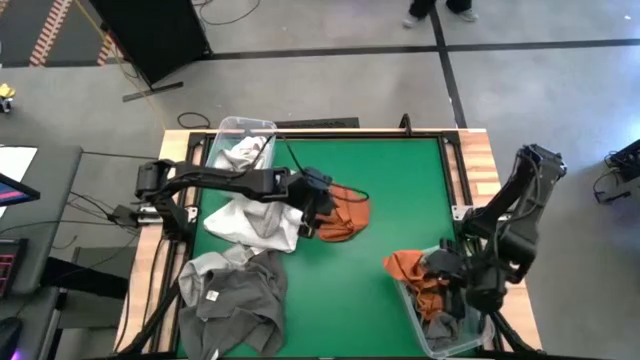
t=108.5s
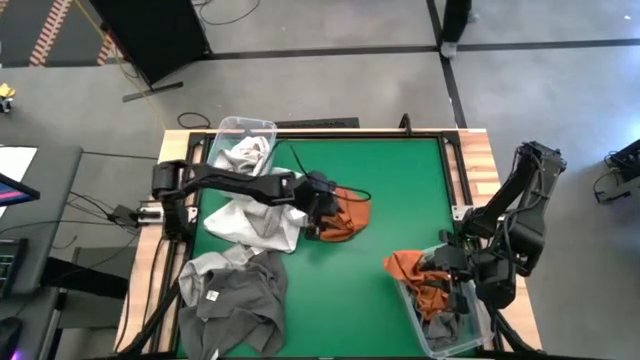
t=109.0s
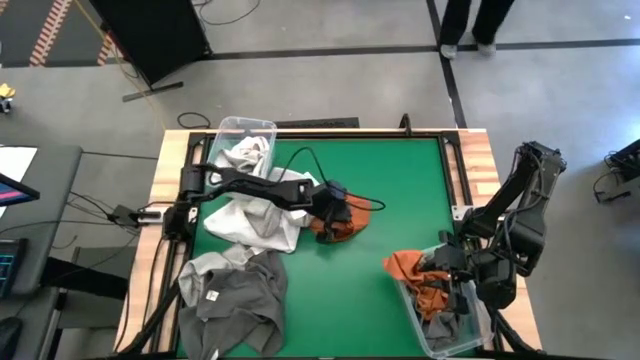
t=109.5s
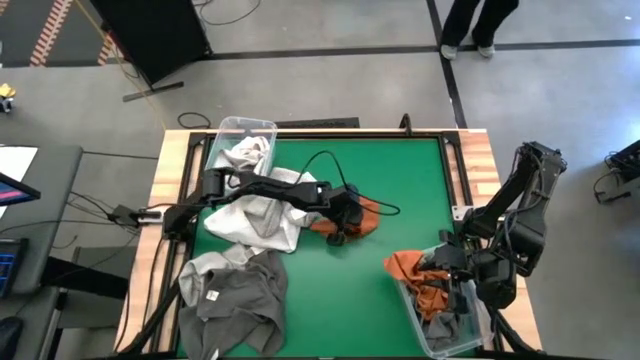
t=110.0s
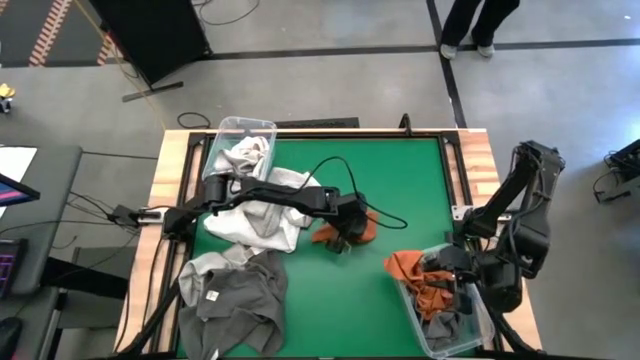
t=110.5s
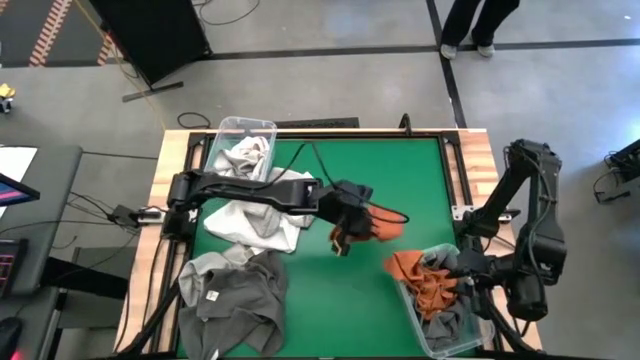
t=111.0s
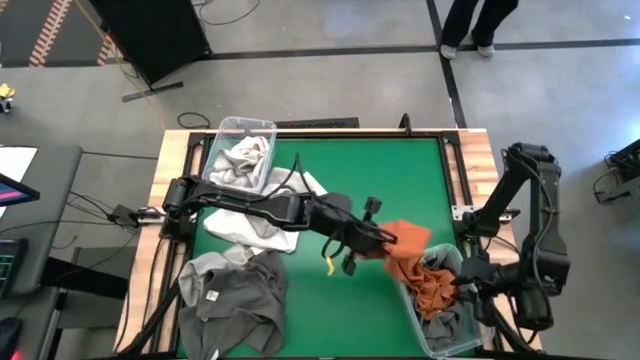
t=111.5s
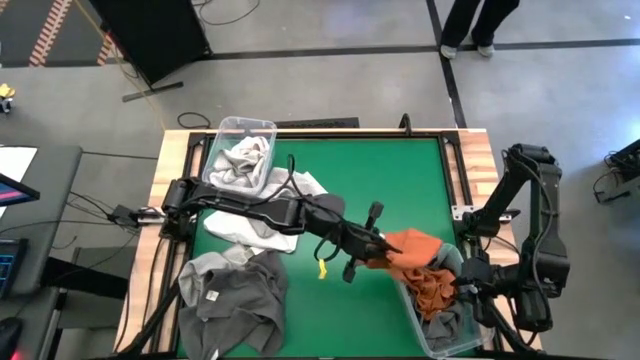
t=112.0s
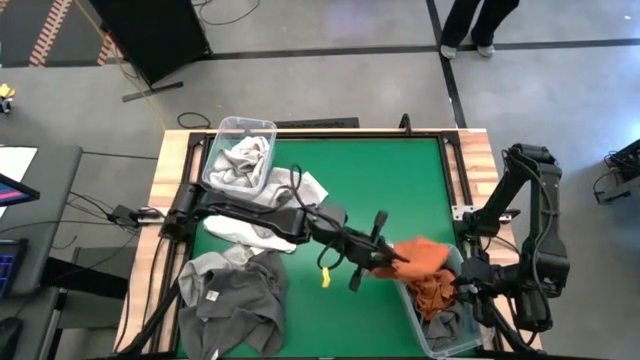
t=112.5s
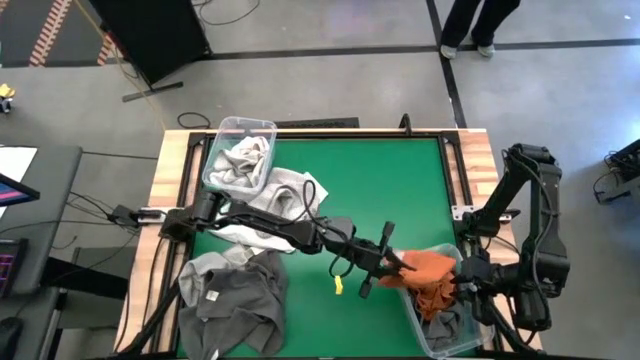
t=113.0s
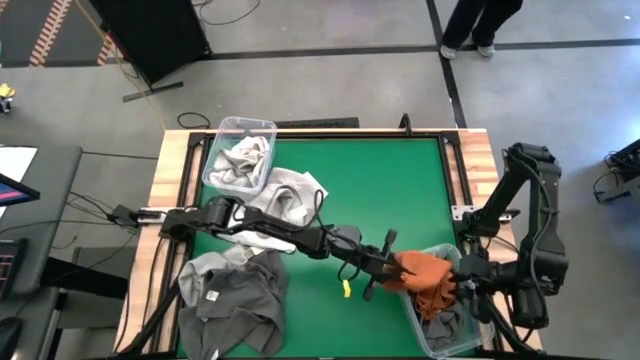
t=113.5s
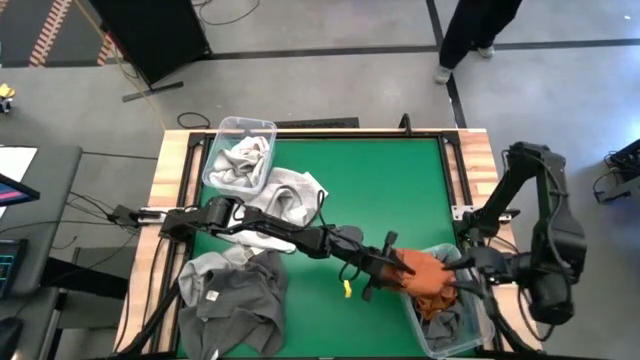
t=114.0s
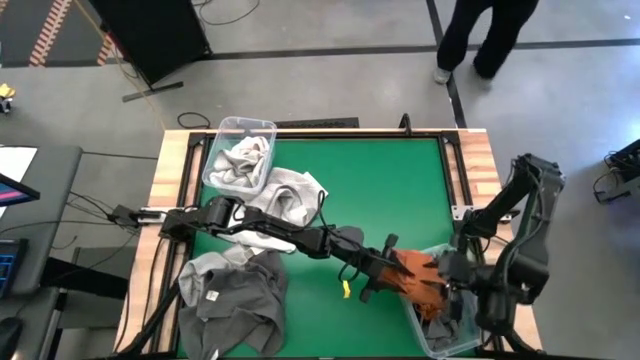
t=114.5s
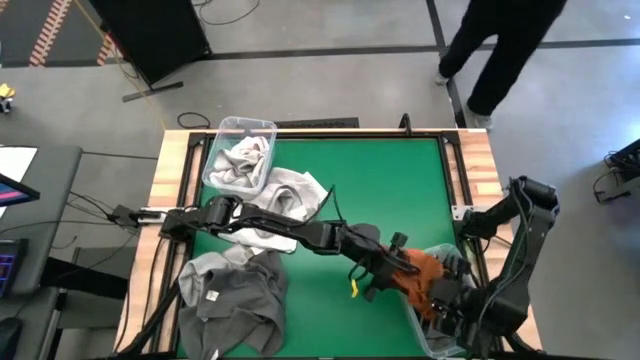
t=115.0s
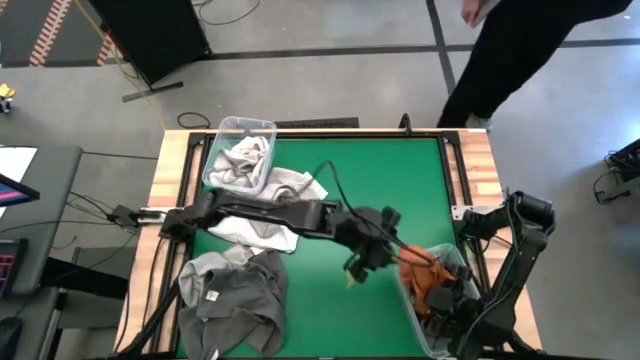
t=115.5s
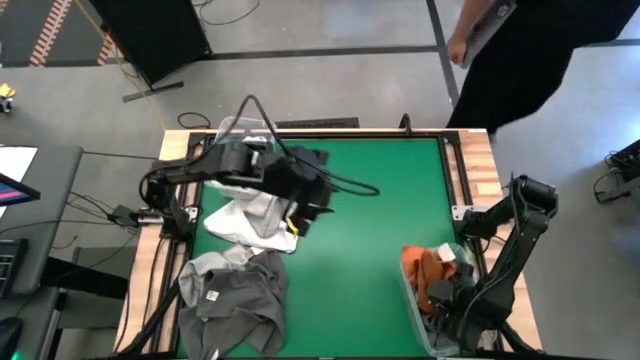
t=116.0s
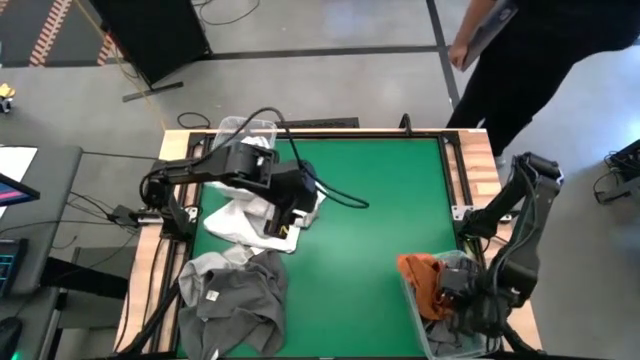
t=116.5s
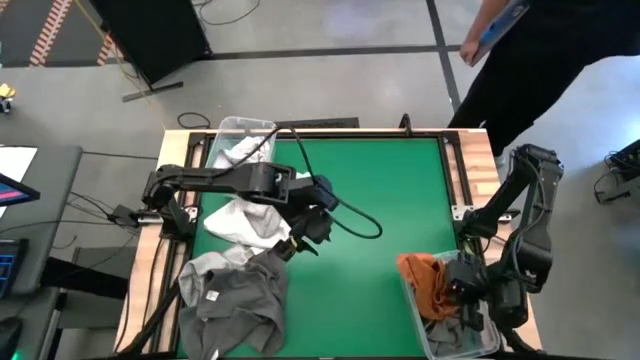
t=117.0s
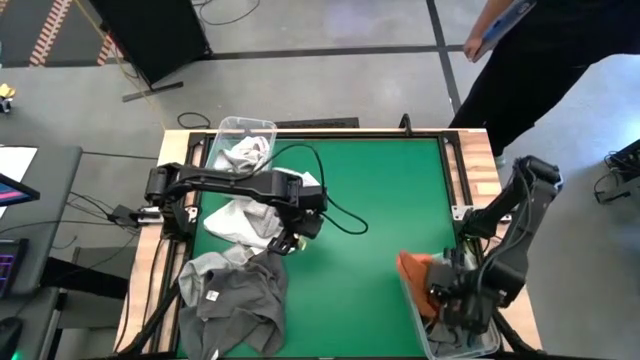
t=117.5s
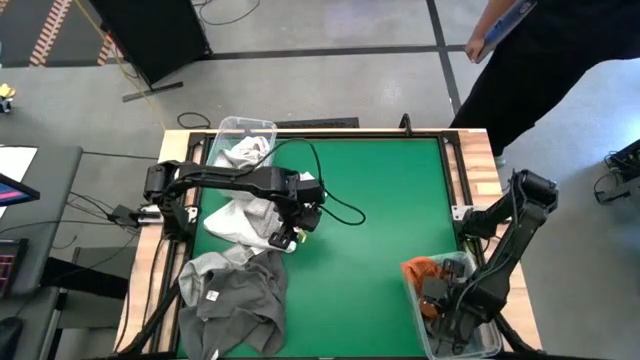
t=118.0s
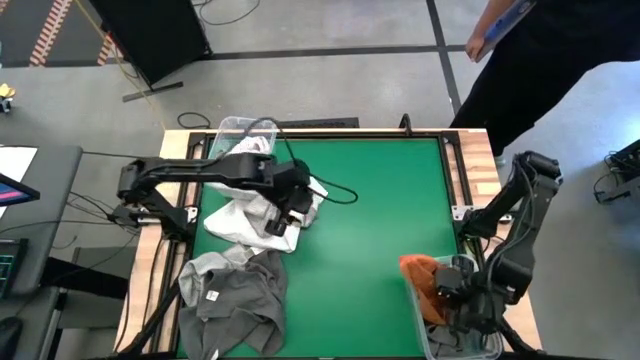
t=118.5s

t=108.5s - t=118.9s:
Task: Sort towels by color in basket
Put the orange towel into the bottom transparent bin

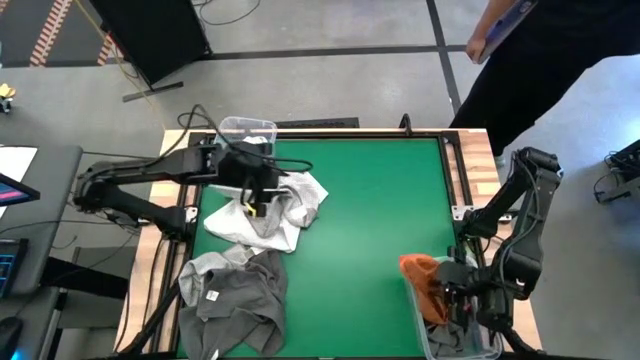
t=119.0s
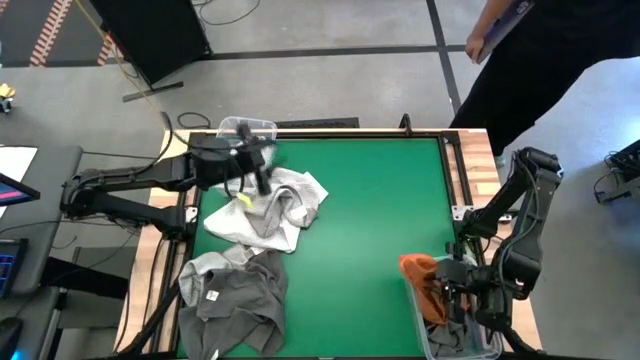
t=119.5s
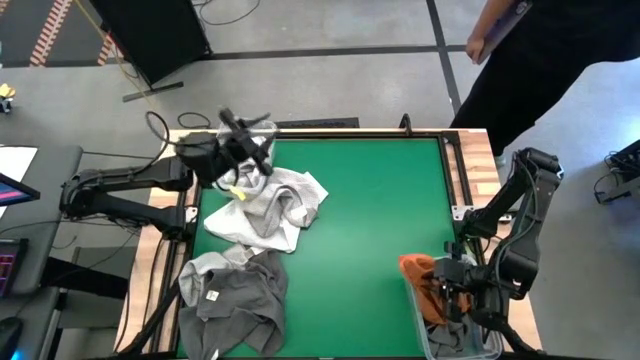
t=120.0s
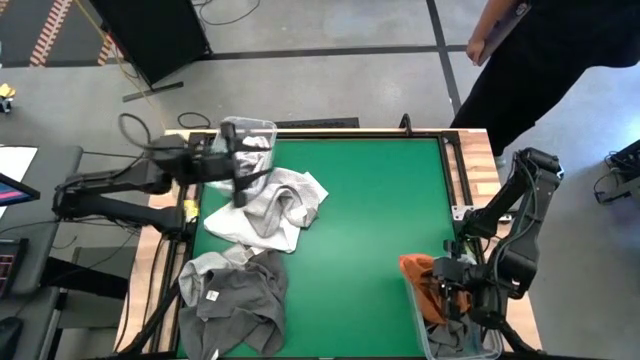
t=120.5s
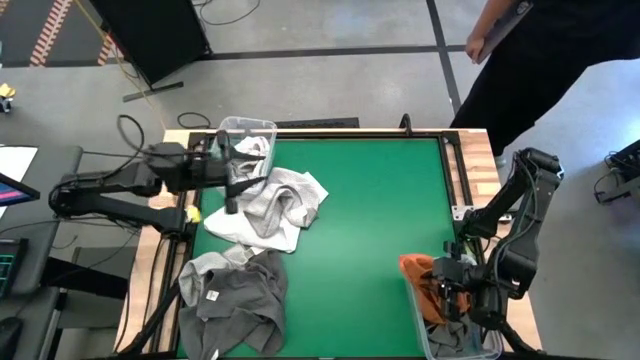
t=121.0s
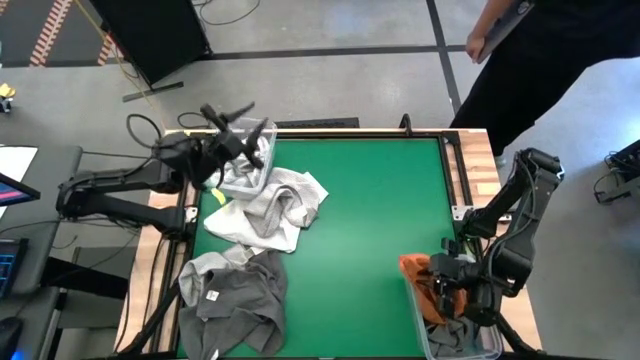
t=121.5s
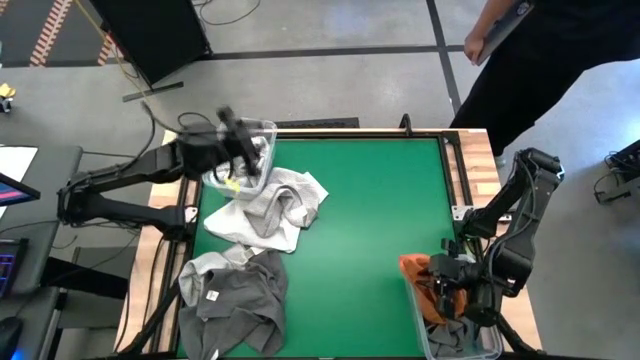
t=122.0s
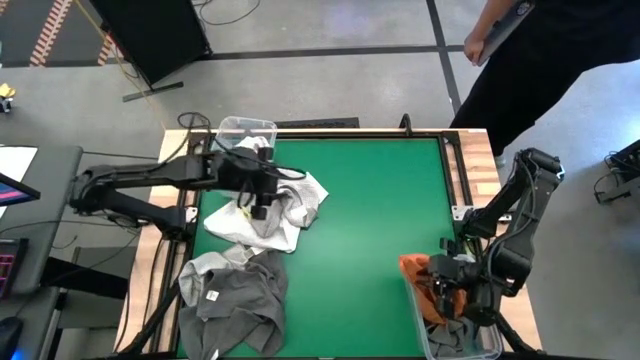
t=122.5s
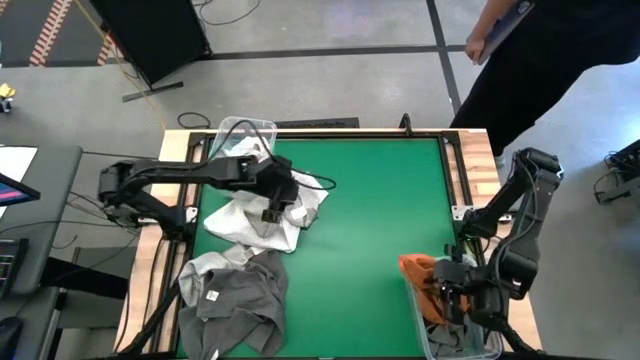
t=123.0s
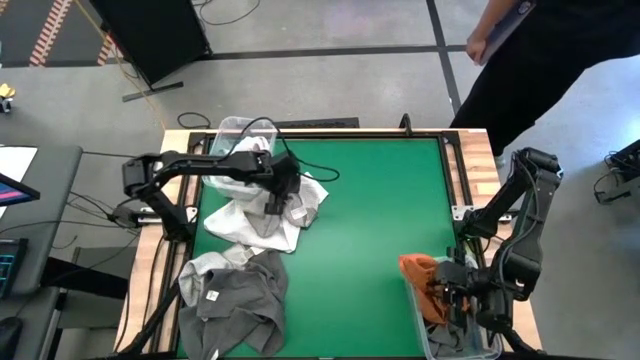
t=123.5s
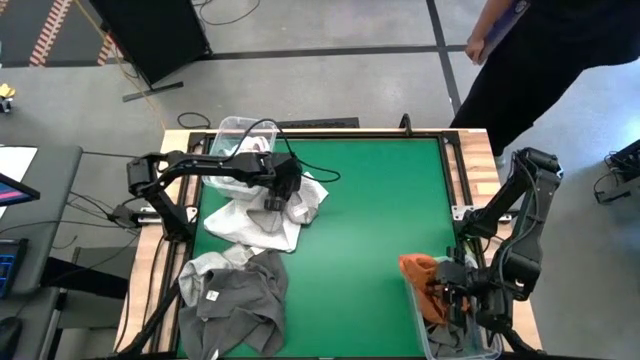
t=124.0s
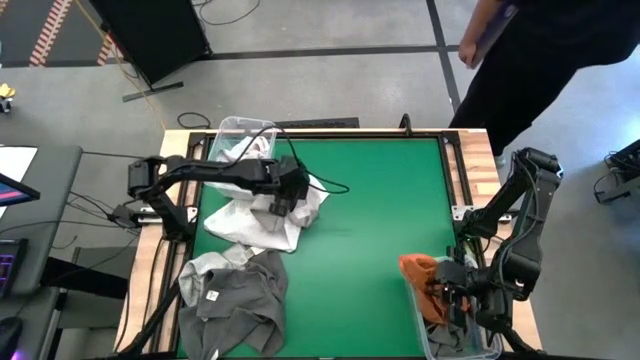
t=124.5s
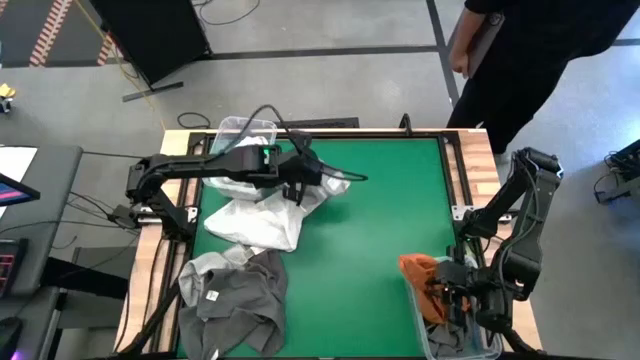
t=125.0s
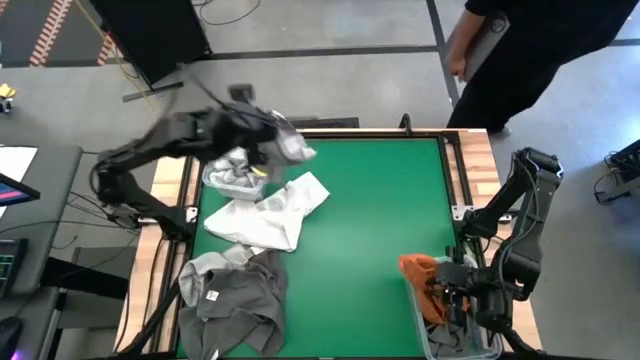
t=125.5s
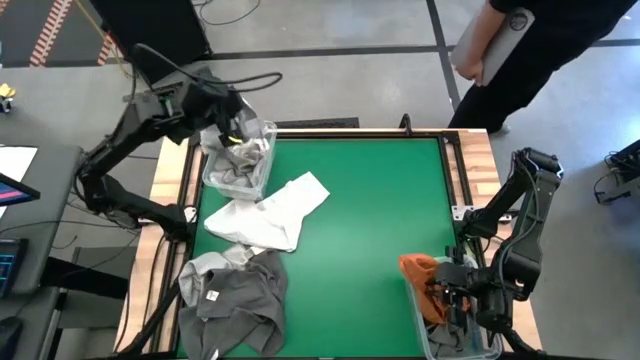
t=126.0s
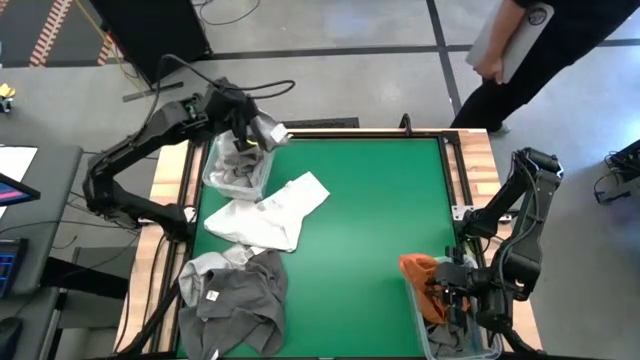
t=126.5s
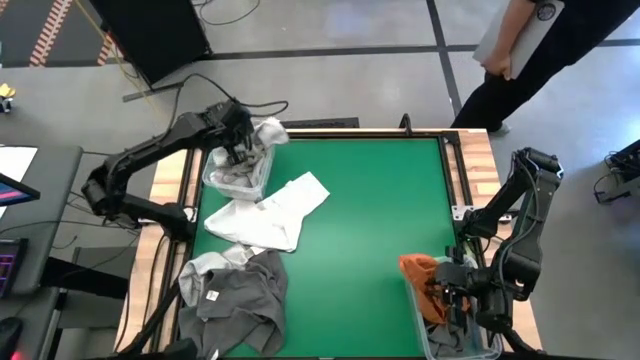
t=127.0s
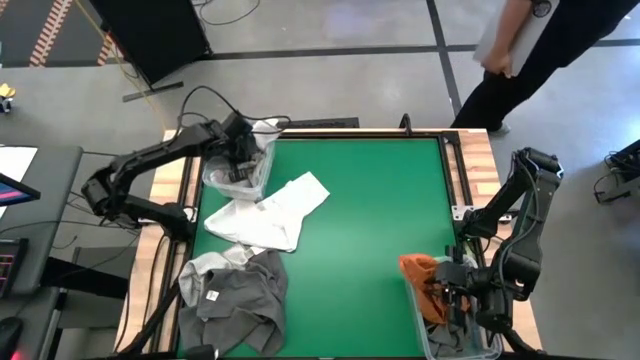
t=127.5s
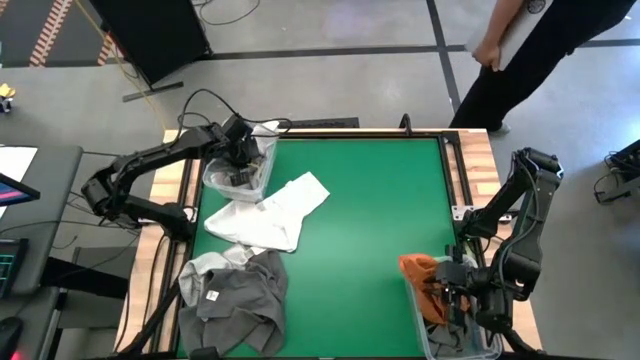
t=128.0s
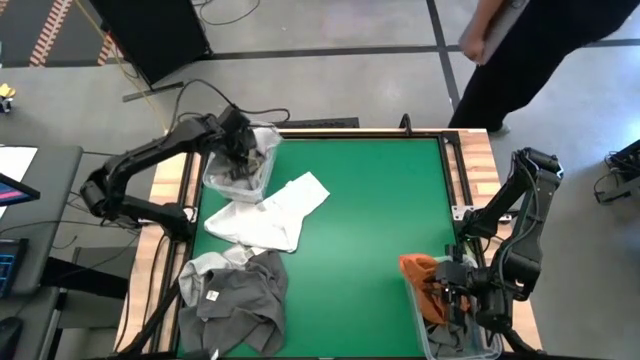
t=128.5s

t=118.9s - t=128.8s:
Put the top light gray towel into the top transparent bin

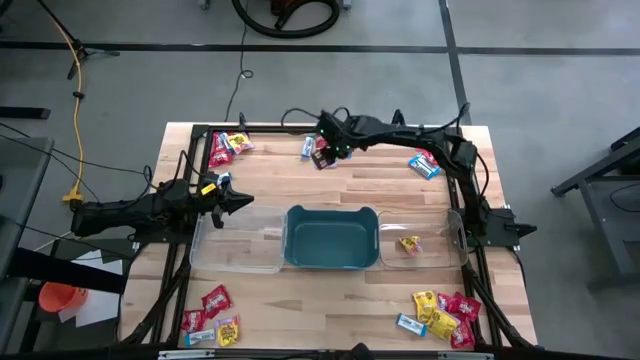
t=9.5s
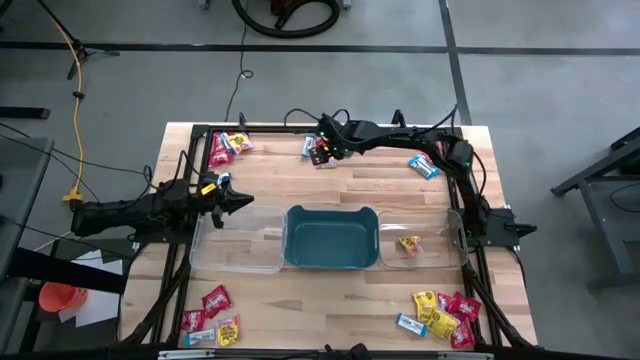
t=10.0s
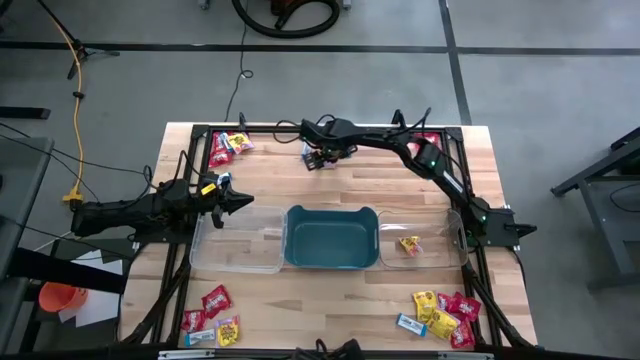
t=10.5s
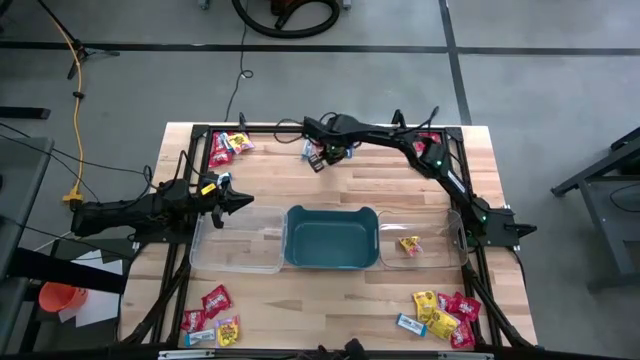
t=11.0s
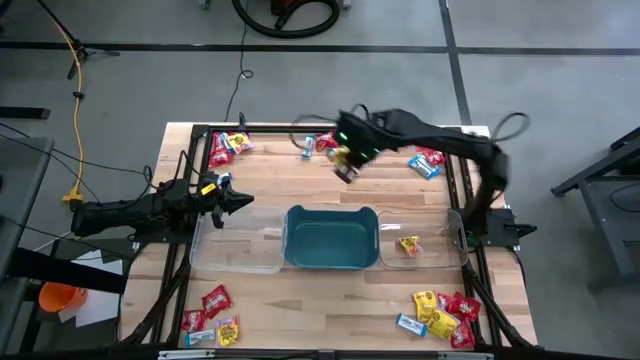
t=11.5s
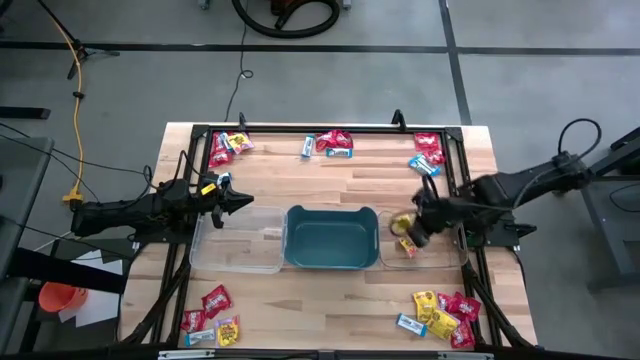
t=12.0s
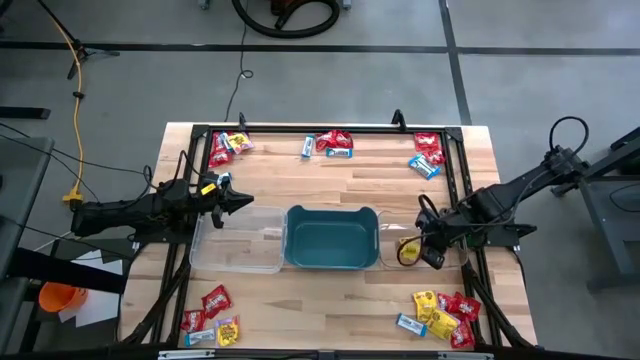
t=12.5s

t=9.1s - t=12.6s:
Task: Sort candy
Put the yellow candy into the right transparent bin
